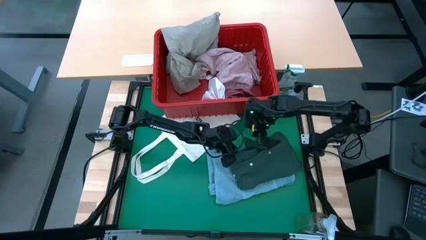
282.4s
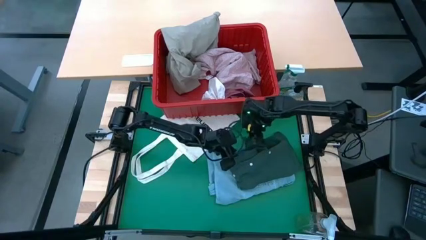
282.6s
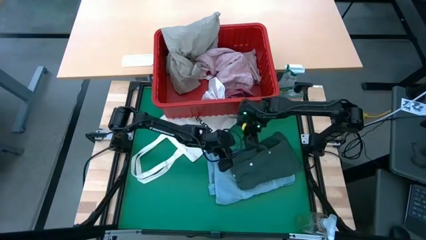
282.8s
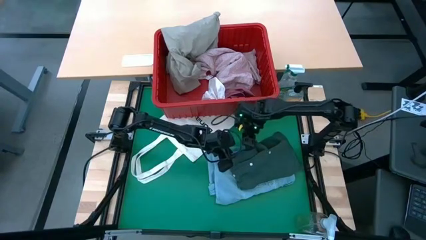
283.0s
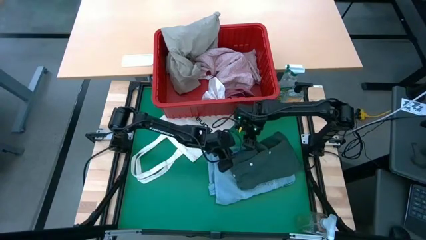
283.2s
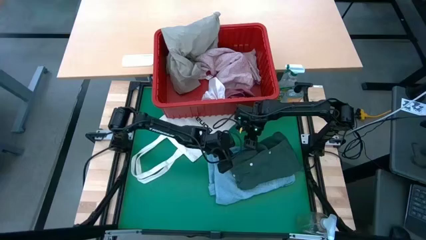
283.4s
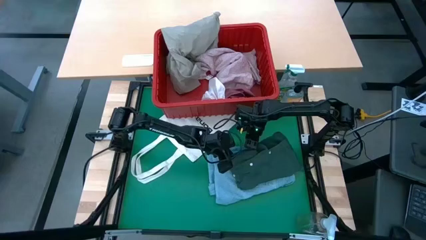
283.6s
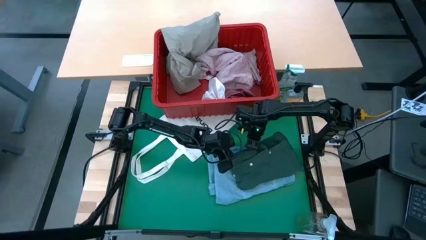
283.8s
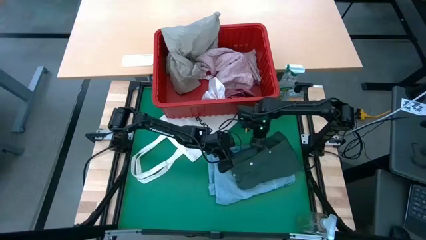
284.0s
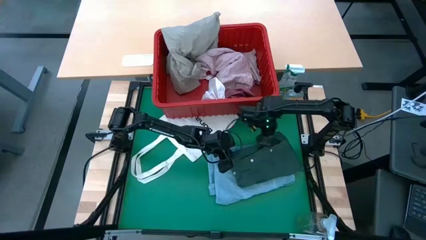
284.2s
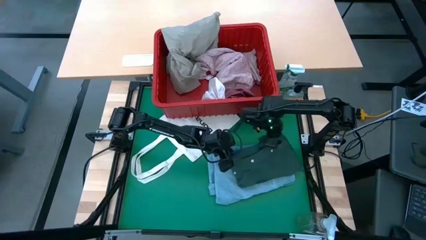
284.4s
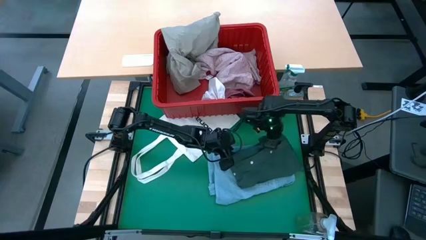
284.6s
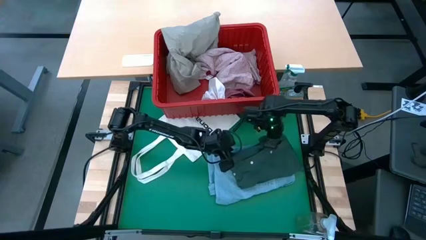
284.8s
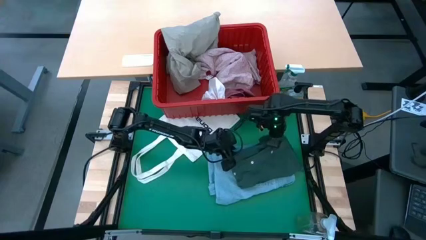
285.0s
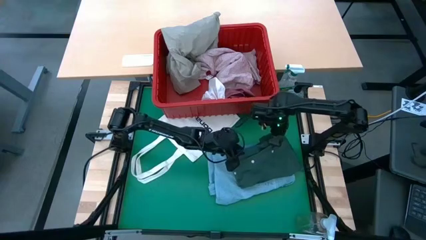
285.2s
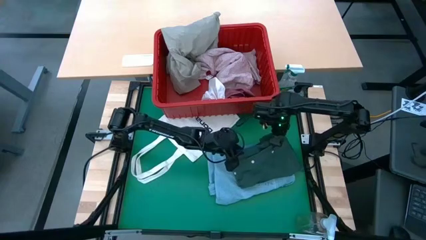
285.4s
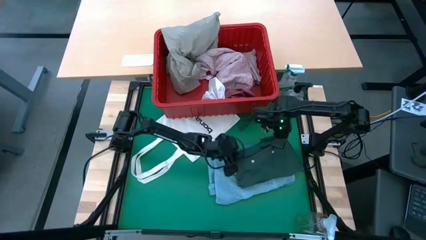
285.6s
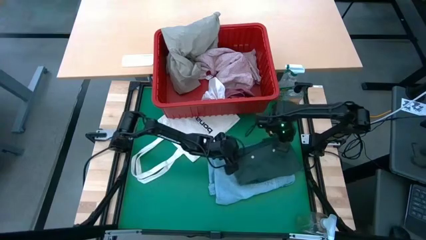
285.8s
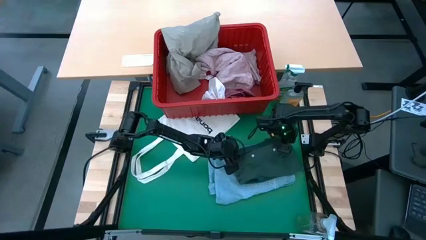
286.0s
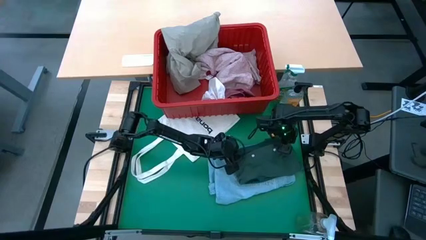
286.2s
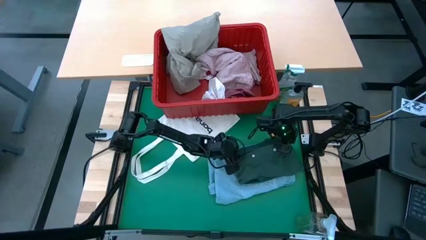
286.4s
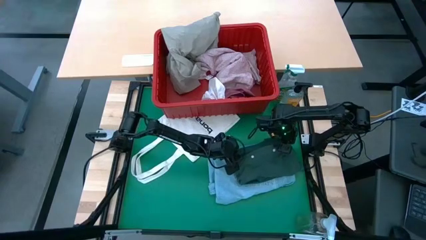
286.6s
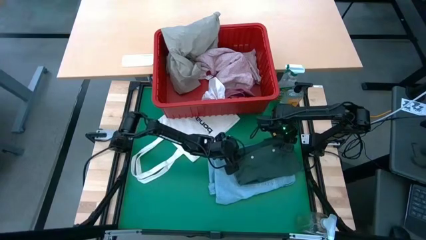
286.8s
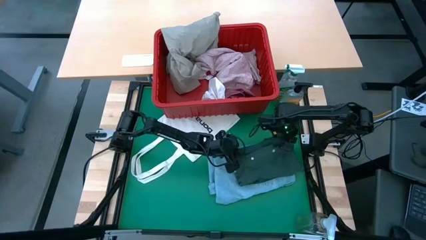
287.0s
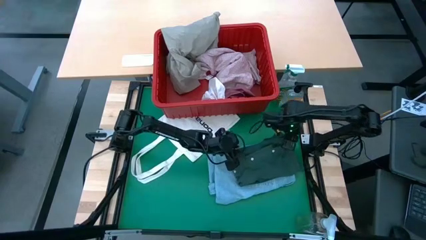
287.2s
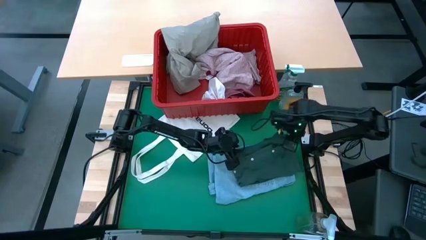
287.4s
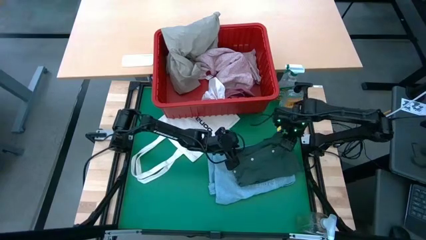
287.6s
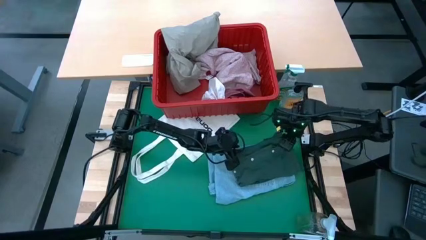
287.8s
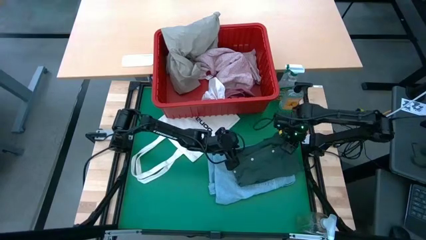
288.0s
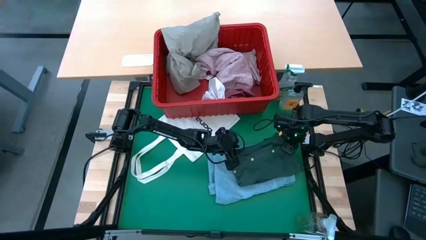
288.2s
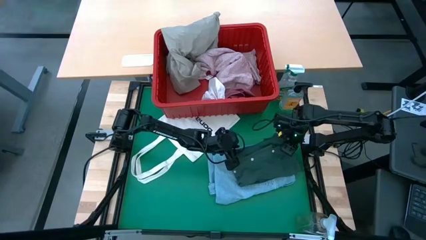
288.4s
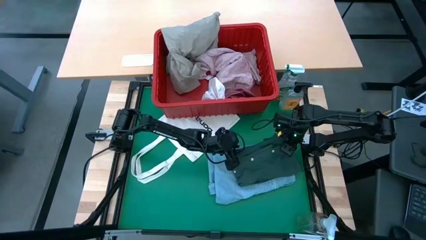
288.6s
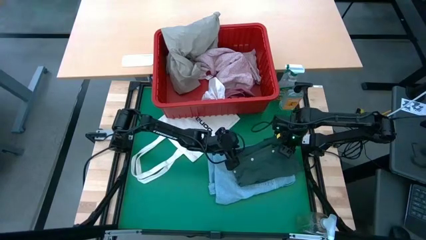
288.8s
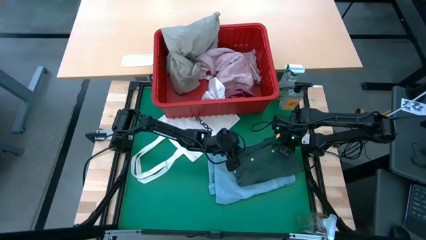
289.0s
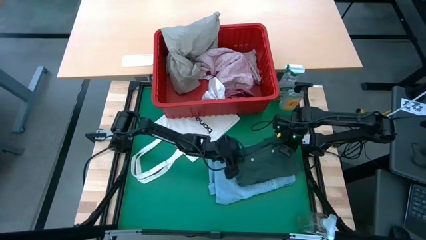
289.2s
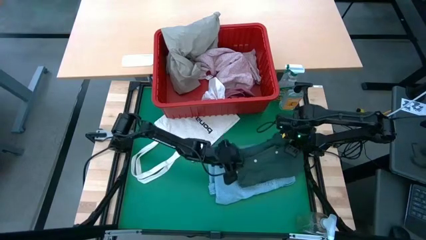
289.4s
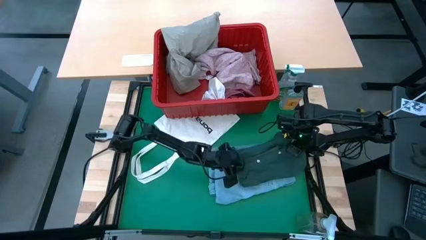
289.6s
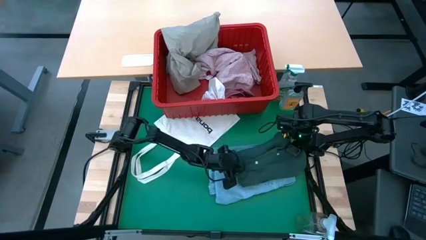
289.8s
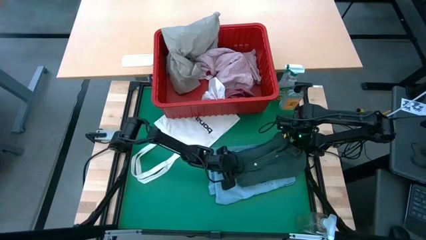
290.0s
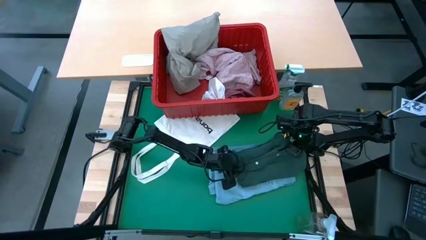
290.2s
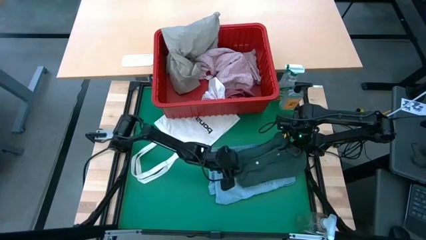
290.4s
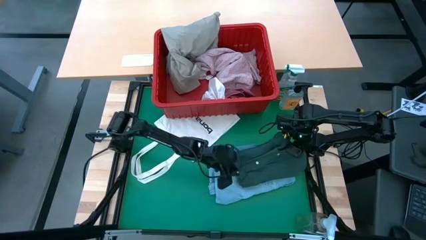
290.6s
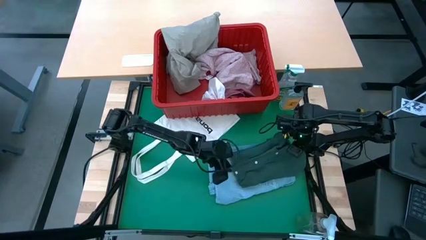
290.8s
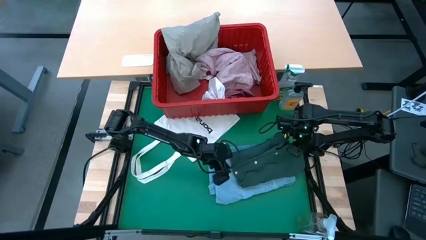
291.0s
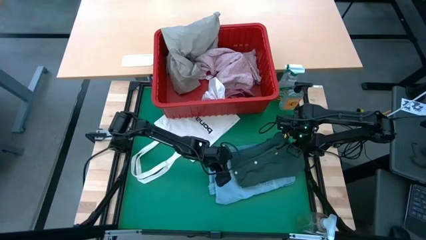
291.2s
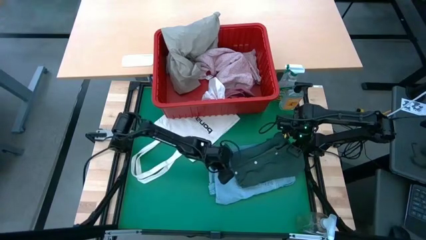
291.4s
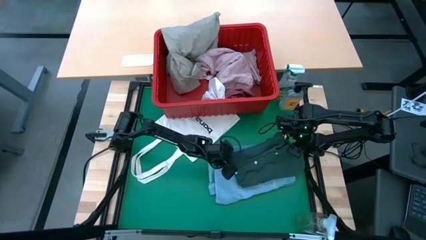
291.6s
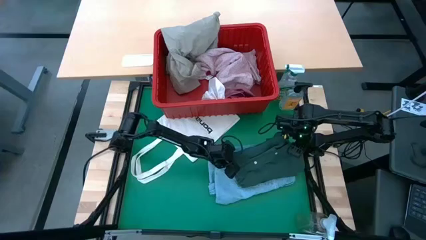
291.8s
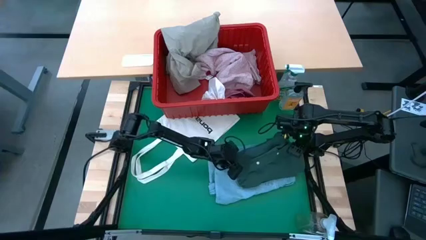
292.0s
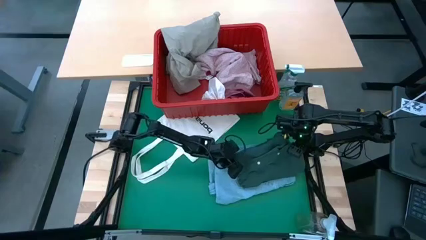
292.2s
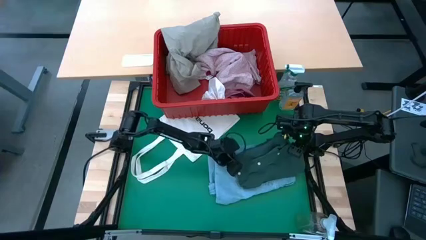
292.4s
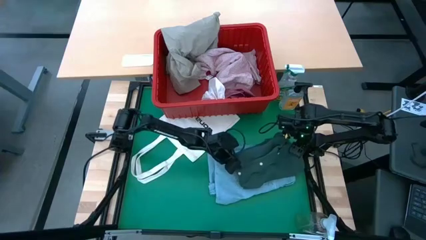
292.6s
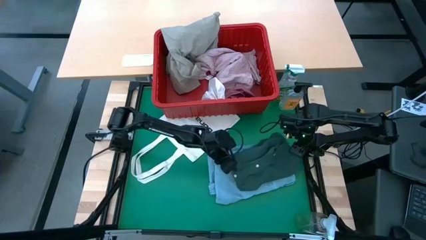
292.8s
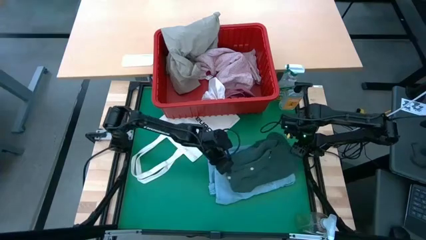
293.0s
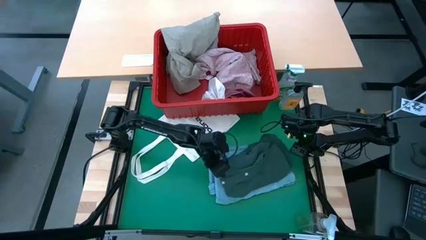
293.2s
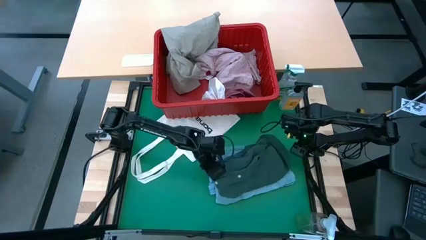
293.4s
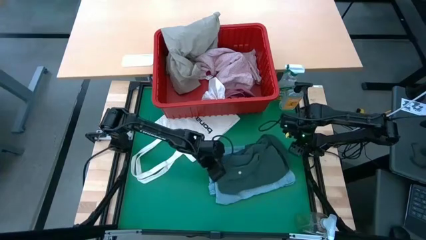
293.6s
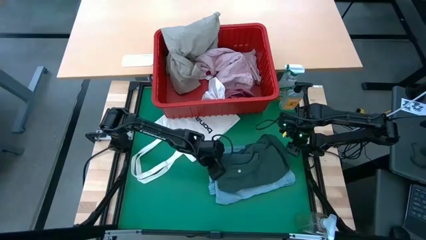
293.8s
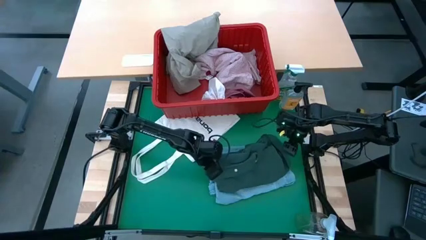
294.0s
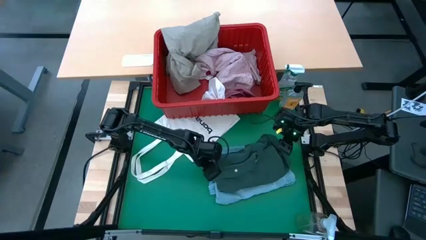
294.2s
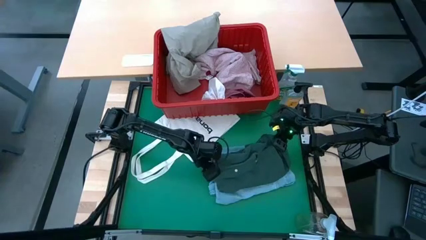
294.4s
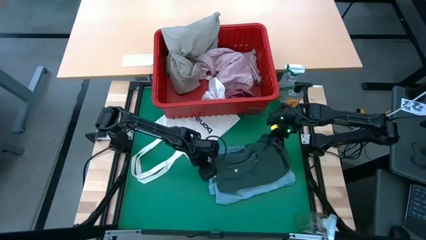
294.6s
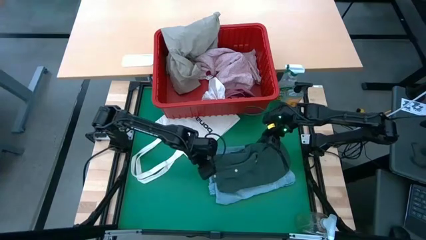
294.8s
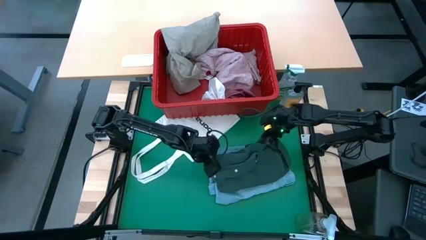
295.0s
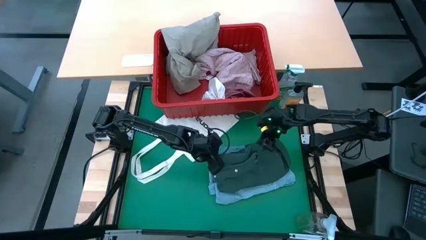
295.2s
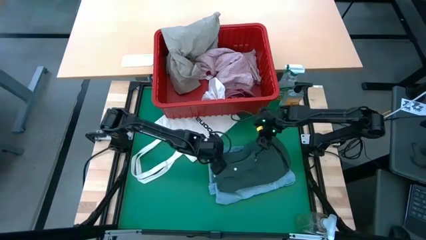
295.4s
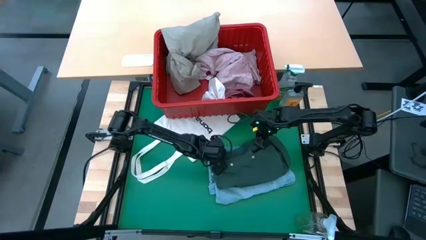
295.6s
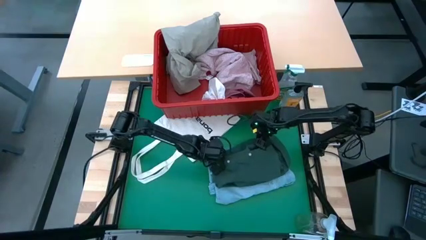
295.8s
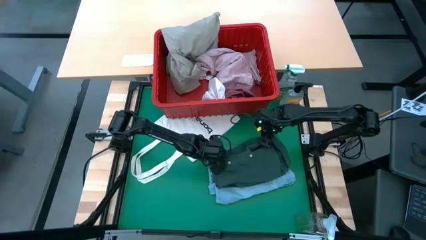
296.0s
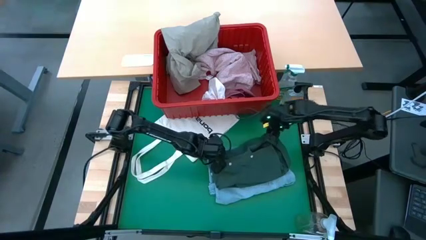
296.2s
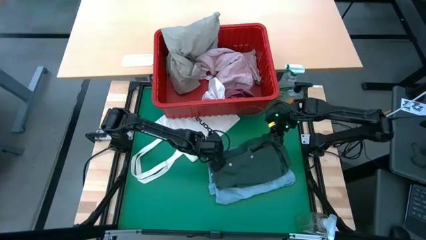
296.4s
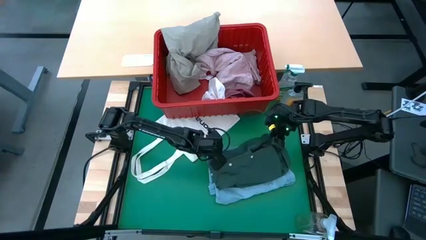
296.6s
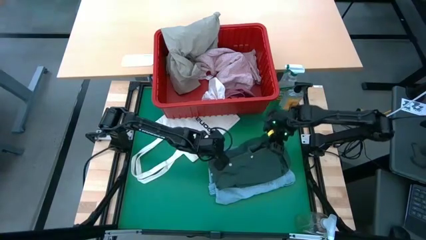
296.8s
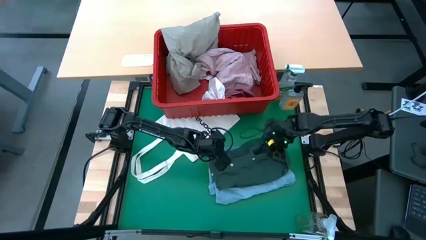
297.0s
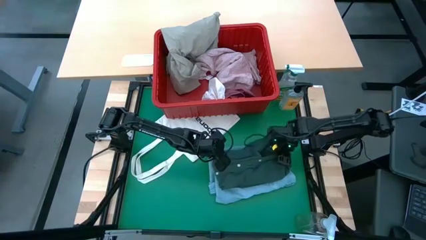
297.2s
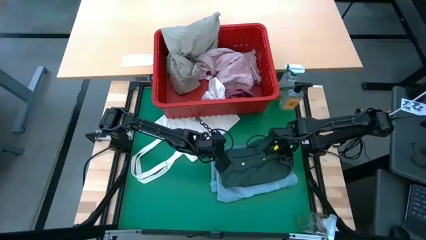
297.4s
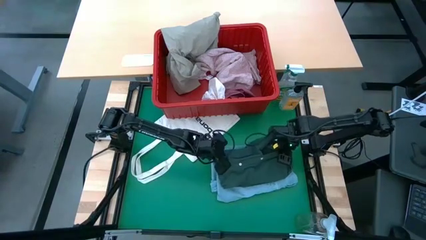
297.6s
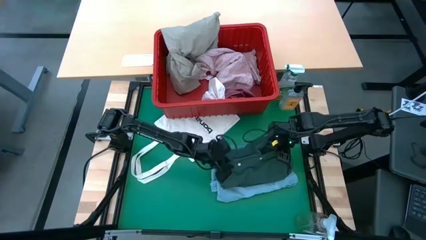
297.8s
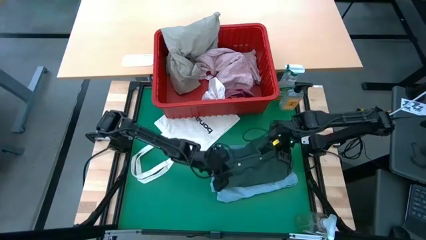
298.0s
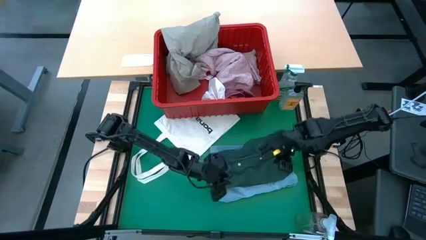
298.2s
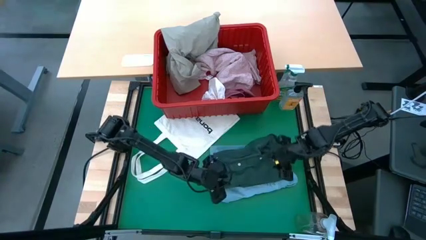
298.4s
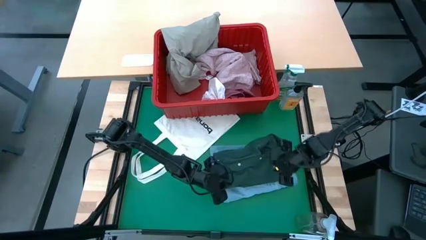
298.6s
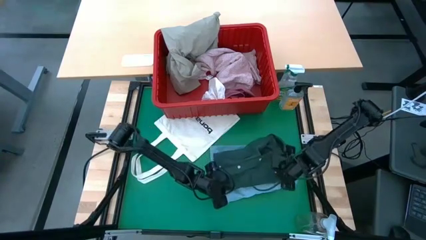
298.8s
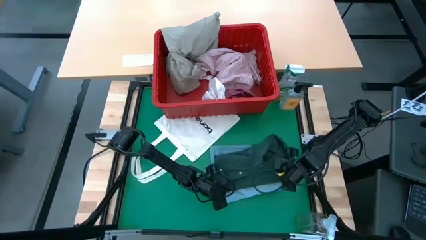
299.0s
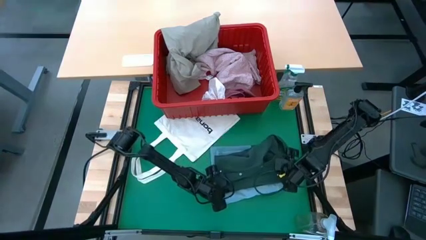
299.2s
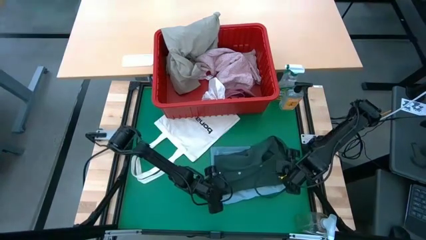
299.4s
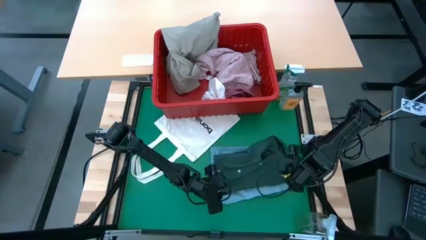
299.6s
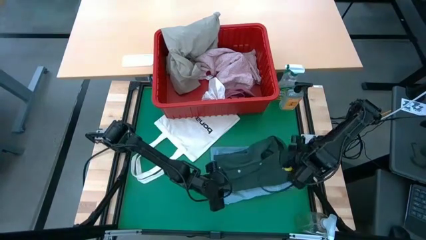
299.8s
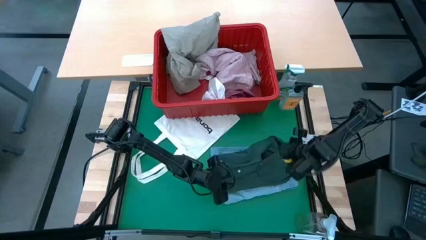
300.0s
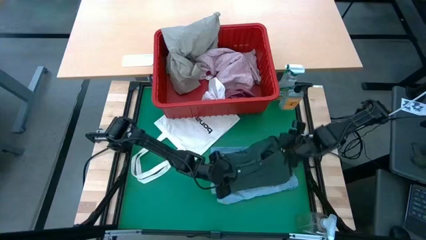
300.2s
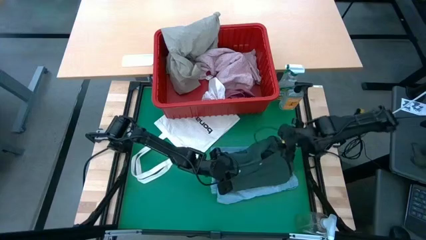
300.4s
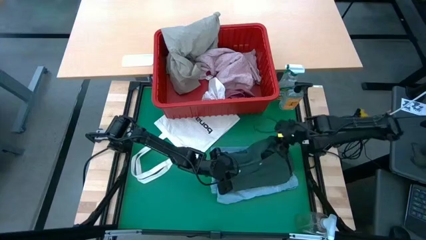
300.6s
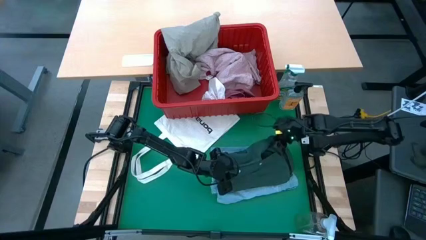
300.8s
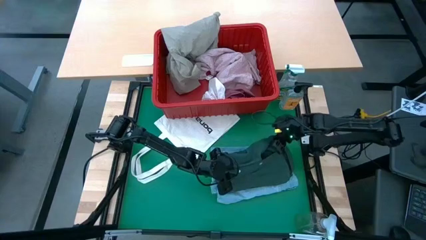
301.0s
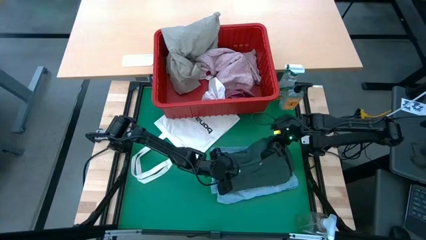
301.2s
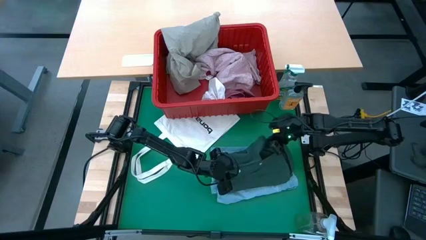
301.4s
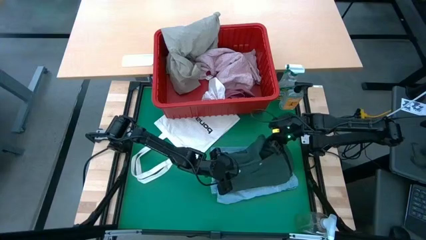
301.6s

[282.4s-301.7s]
Task: Fold laundry
Fold the green shirt
